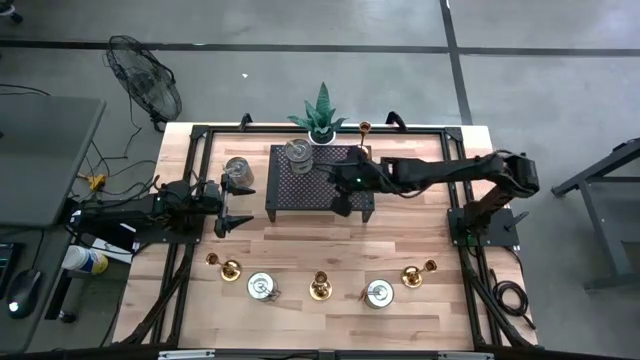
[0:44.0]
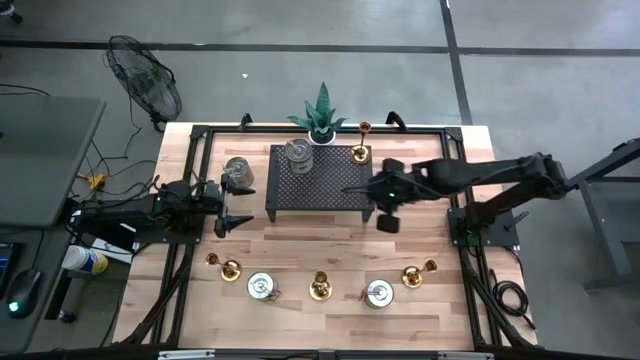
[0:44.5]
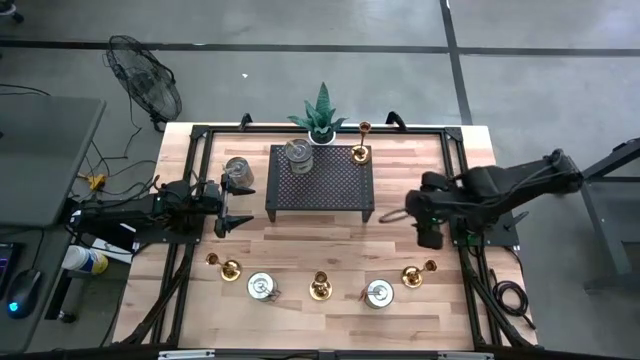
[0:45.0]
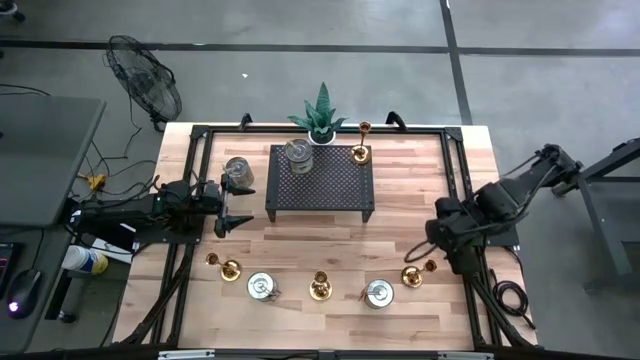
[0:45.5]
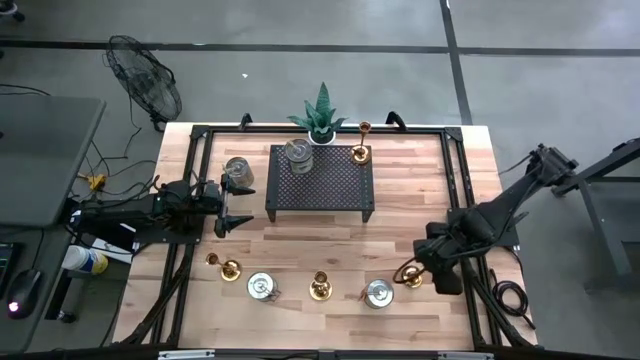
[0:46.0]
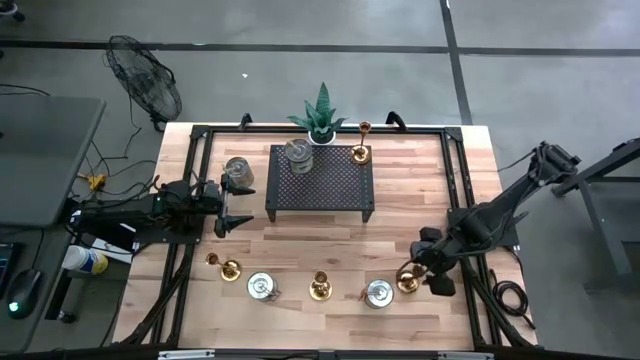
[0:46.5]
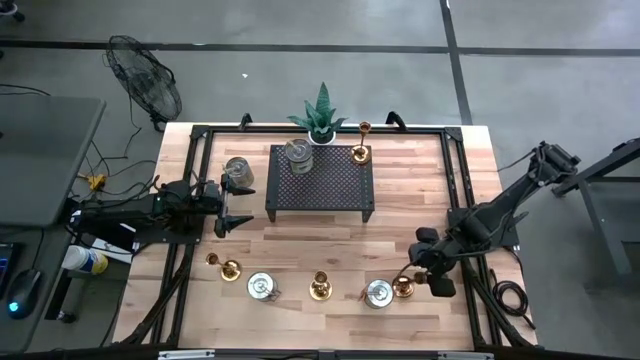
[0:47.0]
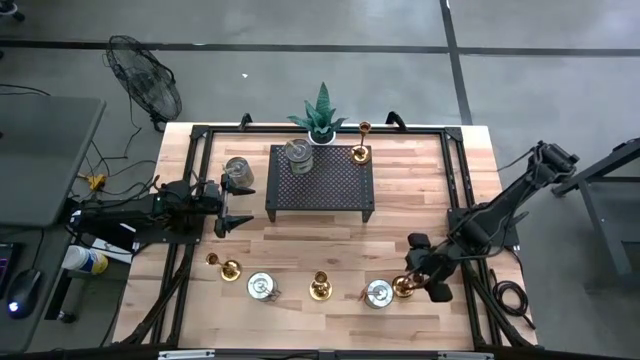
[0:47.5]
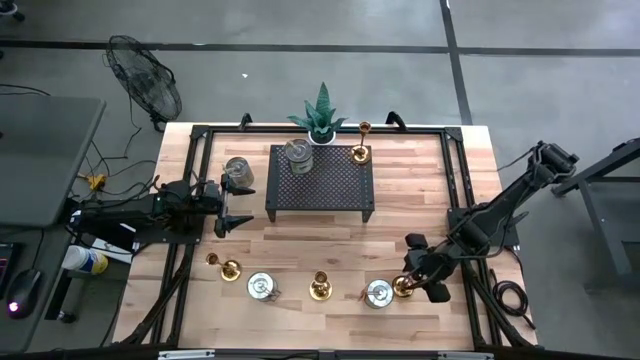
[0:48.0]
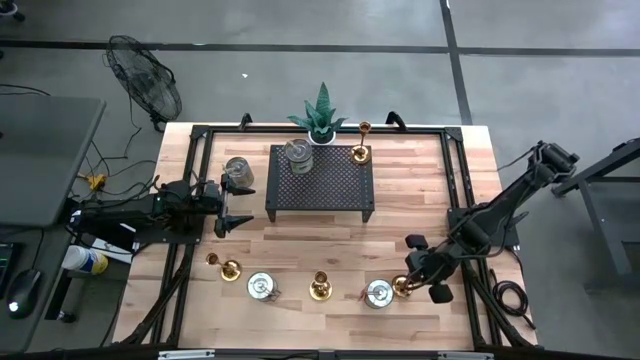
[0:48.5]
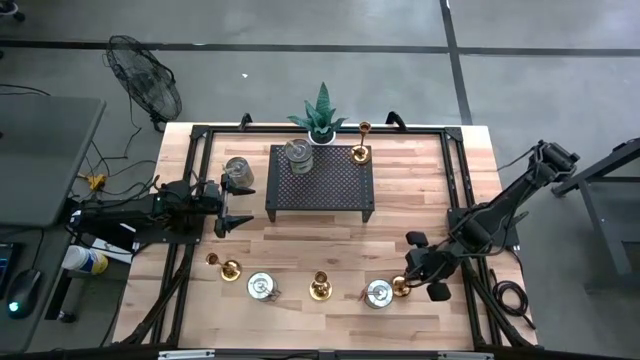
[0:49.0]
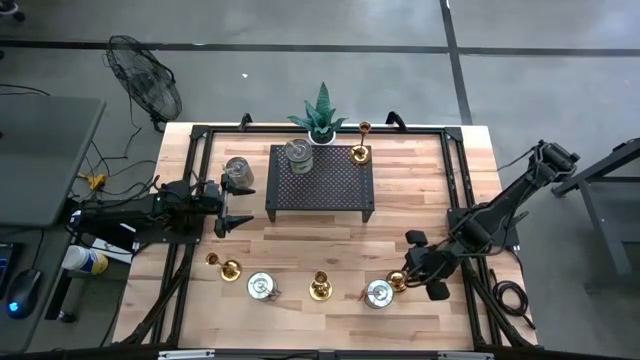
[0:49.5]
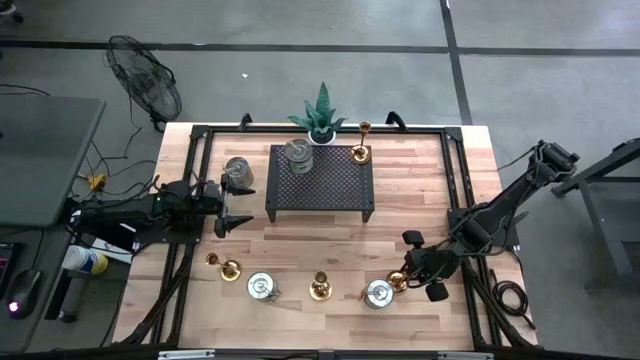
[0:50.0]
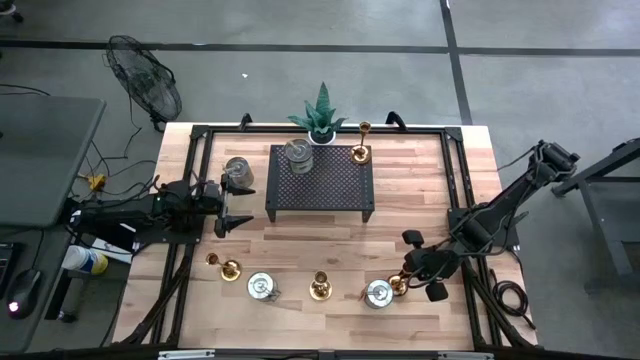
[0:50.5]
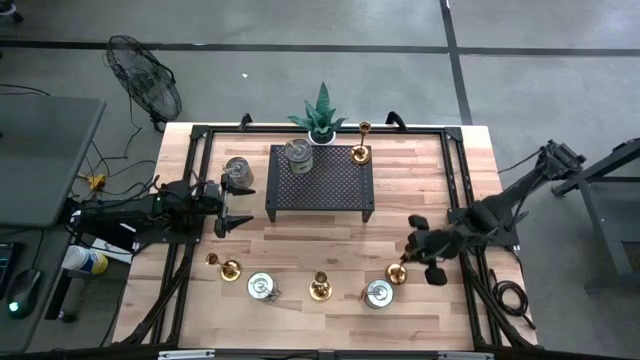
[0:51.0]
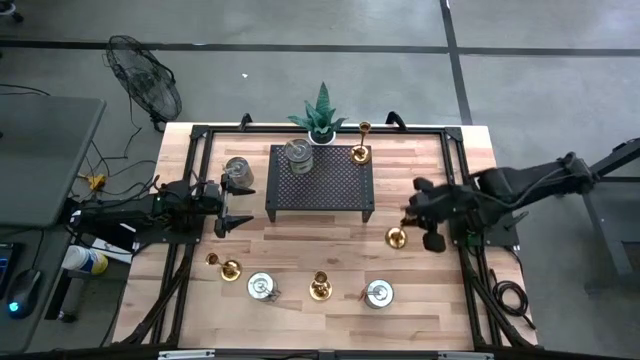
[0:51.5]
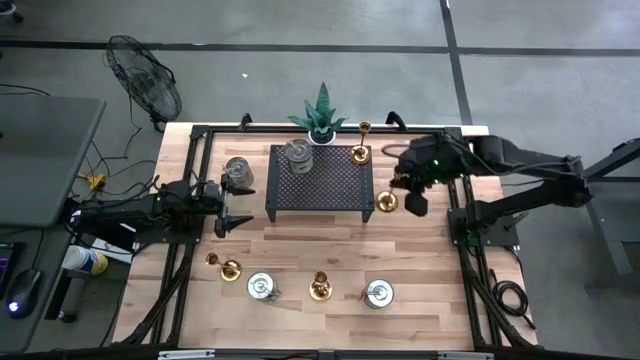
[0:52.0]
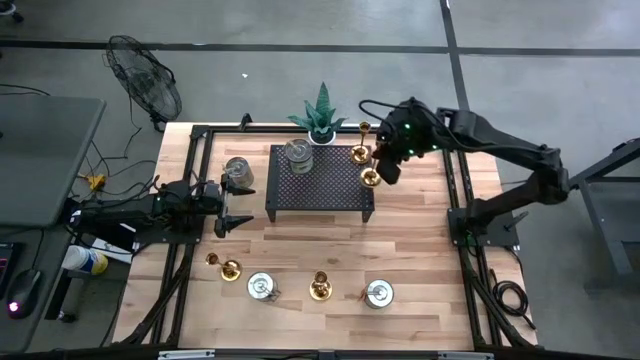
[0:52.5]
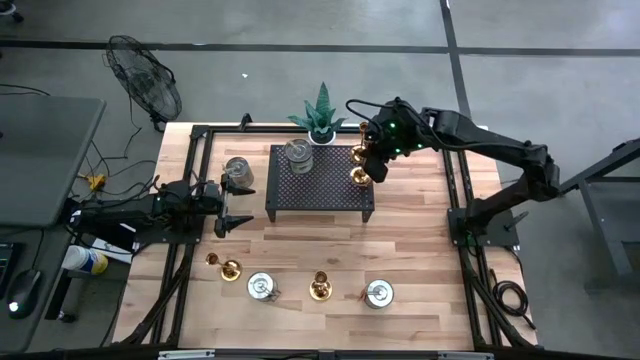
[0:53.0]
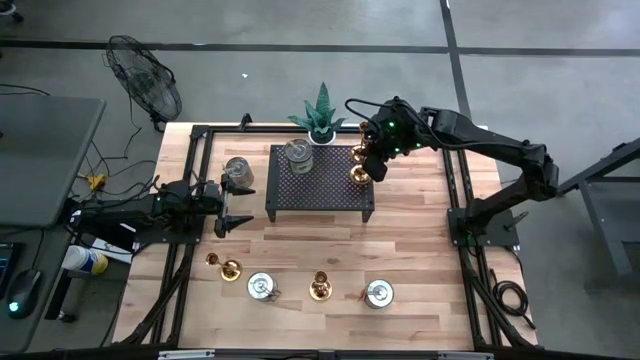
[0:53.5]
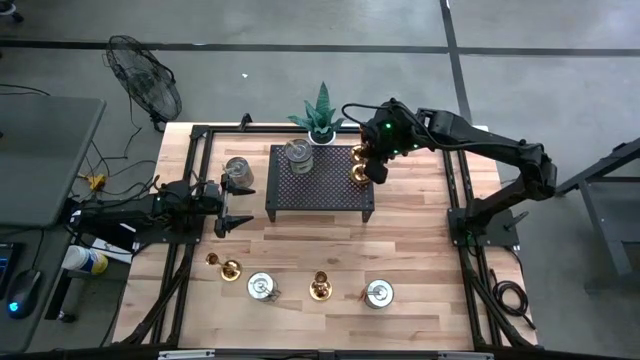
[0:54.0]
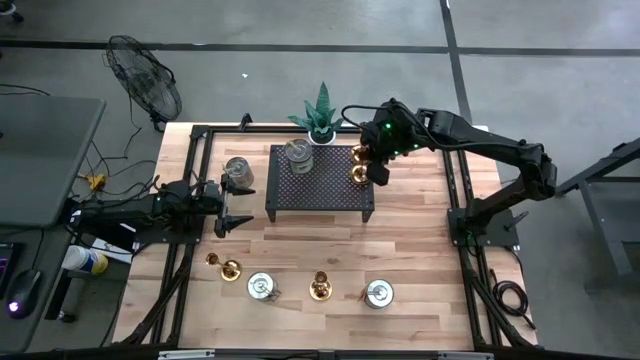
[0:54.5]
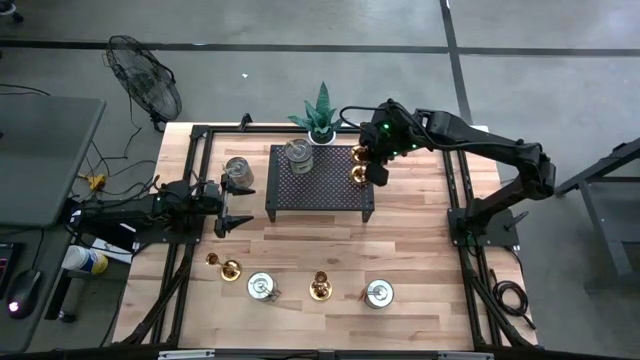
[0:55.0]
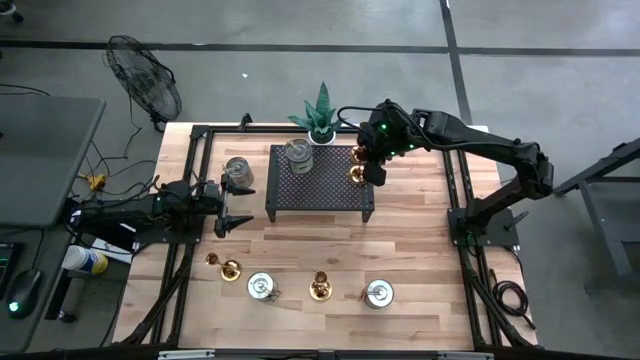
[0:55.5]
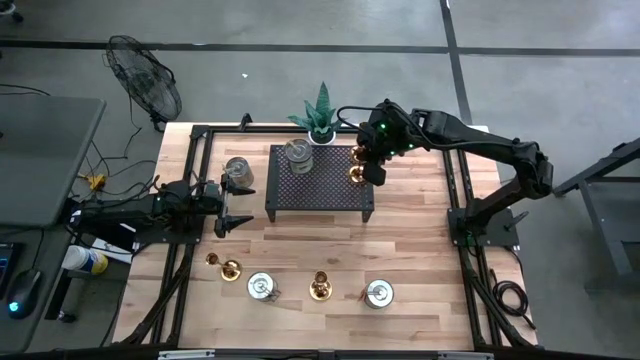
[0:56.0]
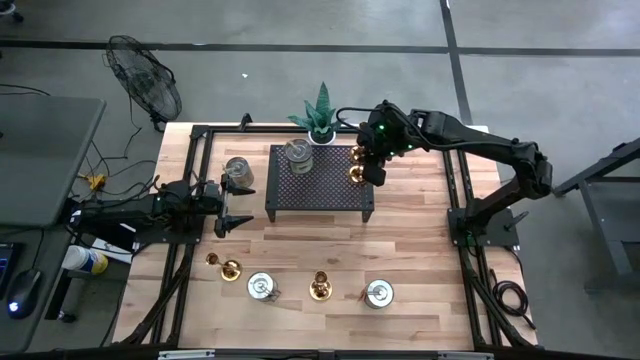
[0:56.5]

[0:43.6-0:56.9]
Task: Pick & Place candle stick holders
Align the gold candle holder on the shelf with the other gold candle holder

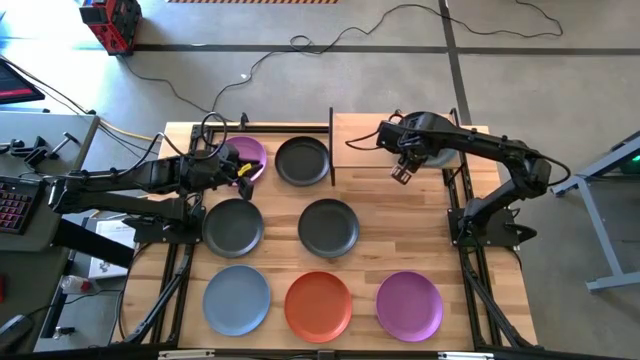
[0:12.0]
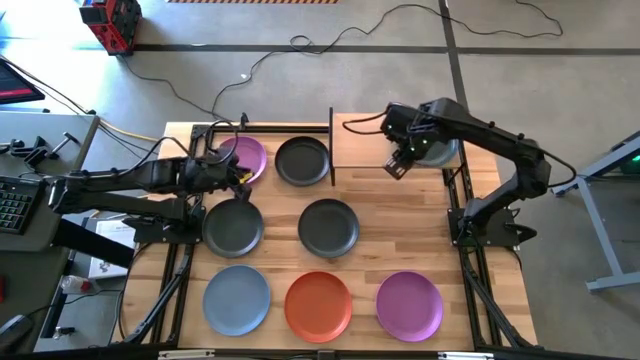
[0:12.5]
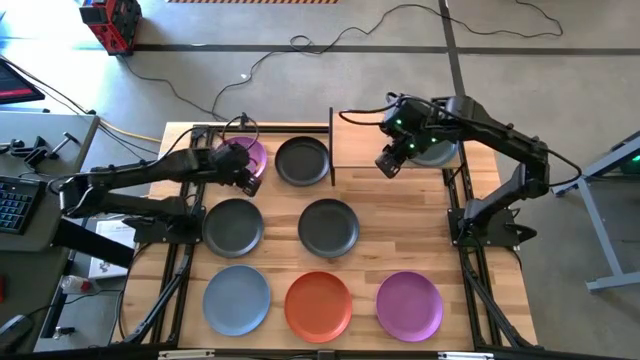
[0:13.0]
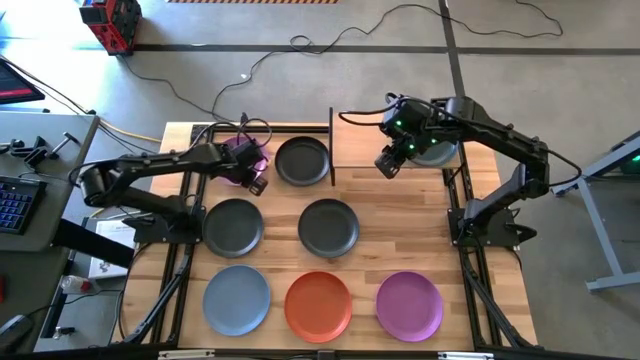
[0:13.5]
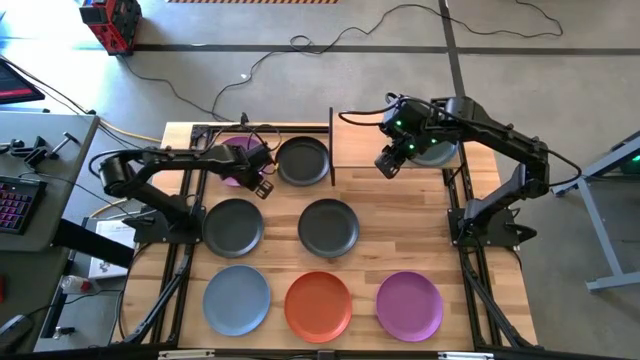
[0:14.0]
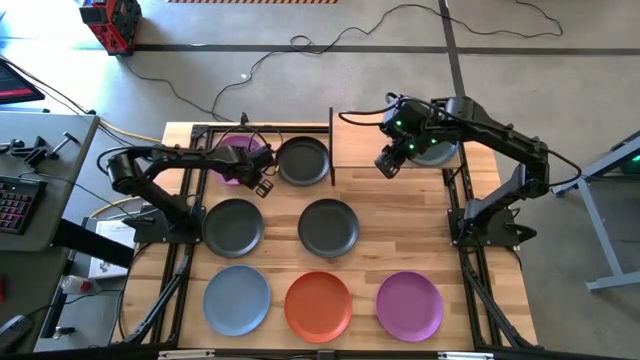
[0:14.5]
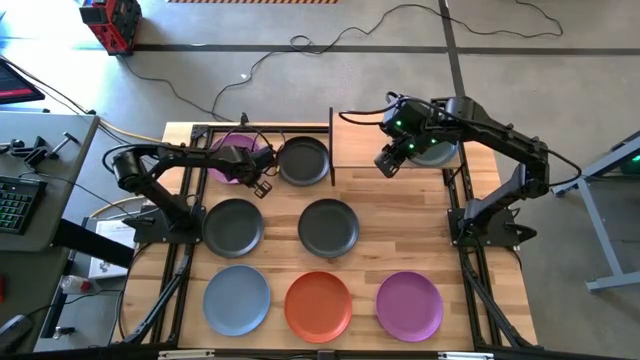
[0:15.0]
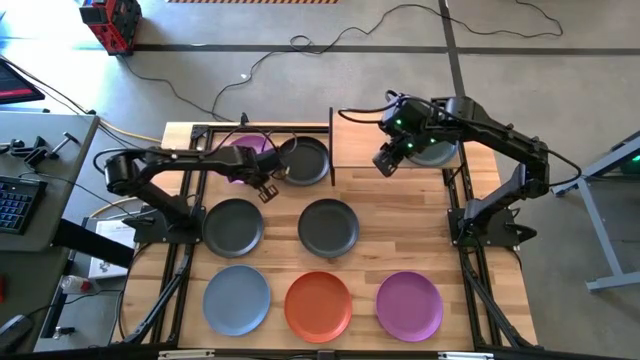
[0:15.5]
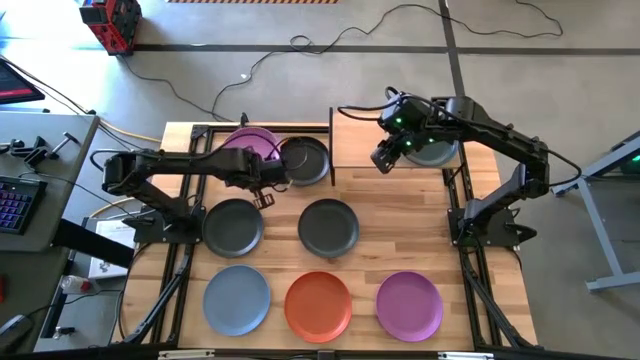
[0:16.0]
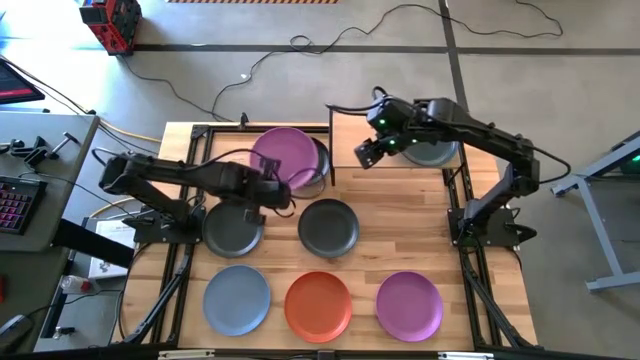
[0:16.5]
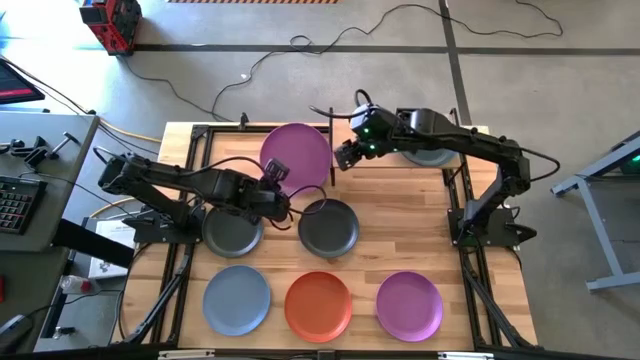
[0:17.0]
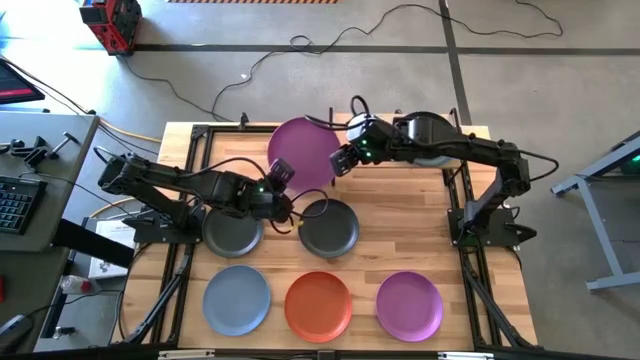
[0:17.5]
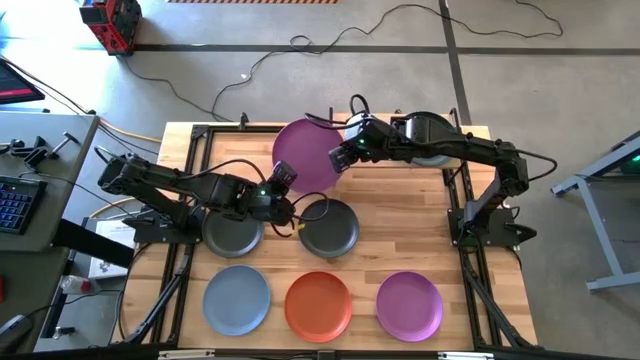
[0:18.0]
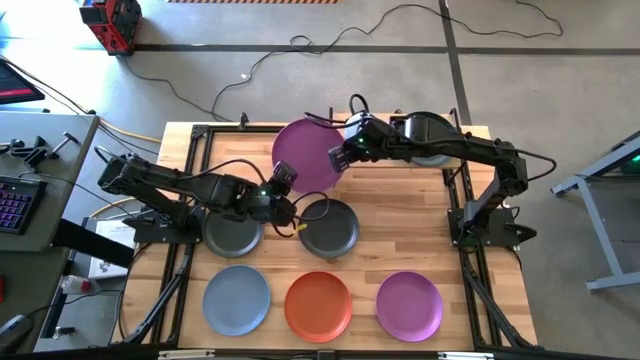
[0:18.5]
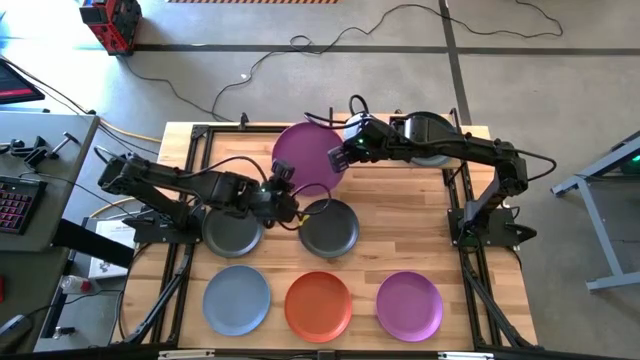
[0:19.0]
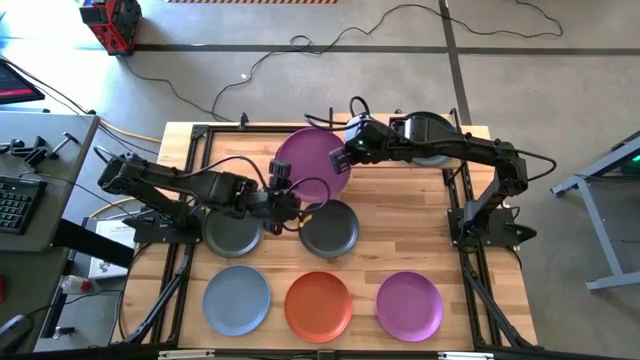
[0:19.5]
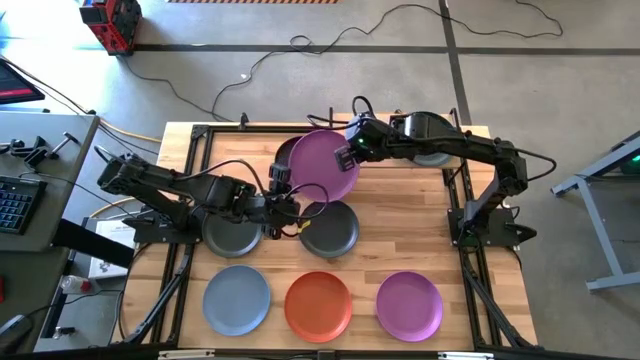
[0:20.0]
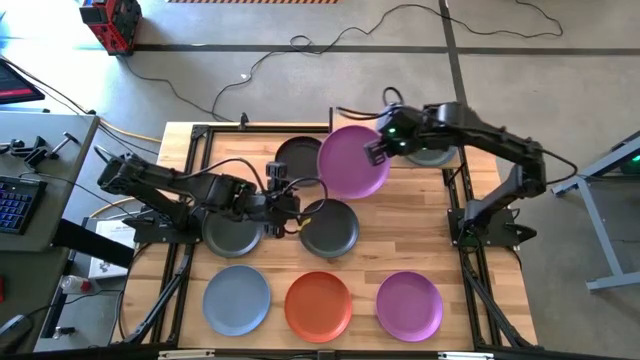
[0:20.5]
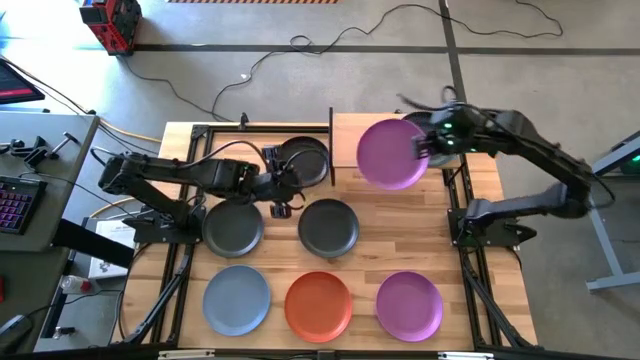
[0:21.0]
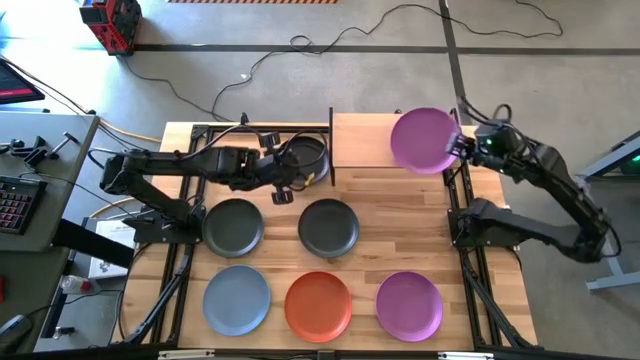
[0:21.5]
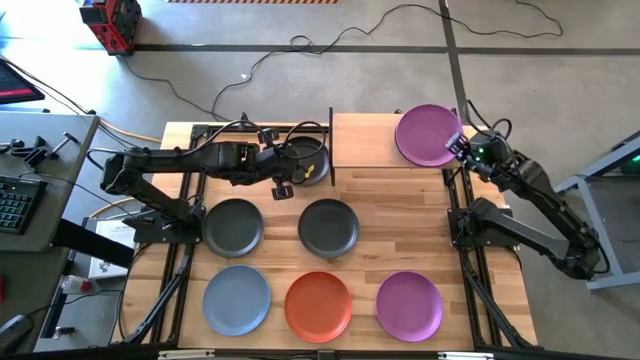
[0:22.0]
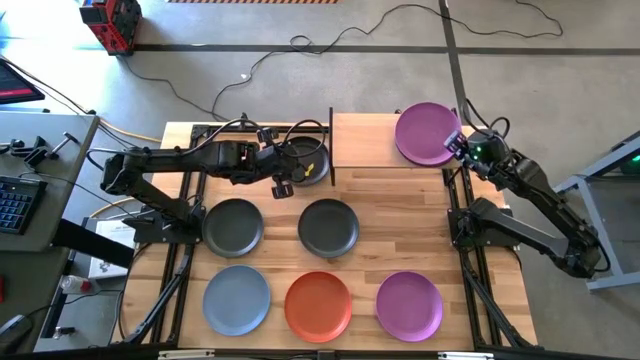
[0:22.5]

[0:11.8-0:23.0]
Task: Place and stack plates onto a shelf
Stack the purple plate on top of the black plate on the shelf
